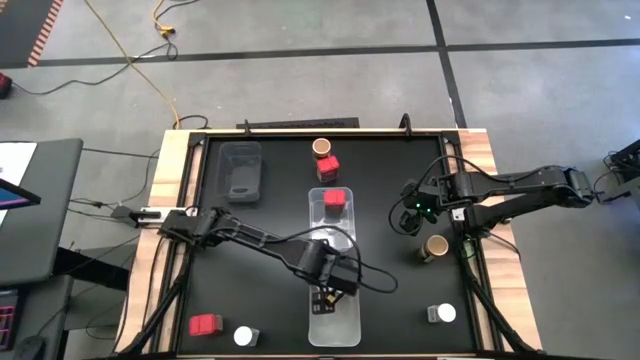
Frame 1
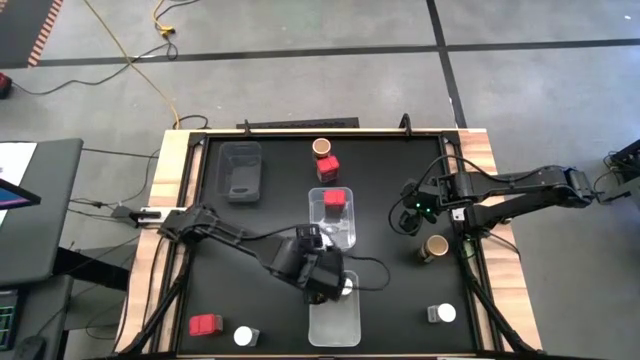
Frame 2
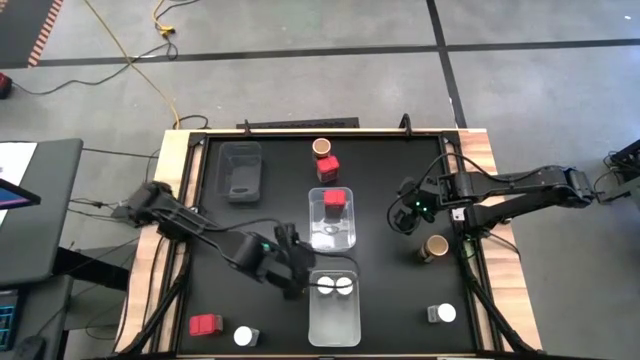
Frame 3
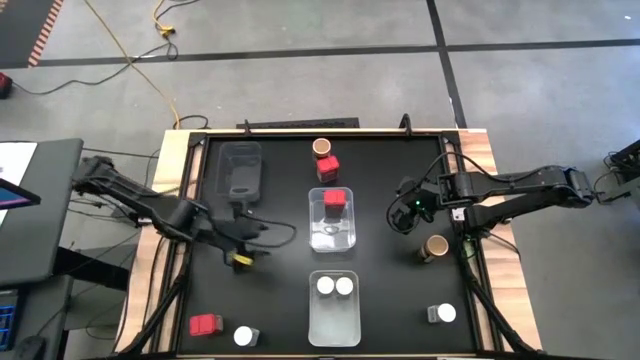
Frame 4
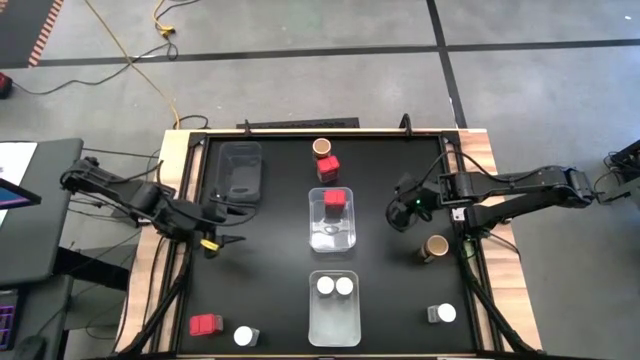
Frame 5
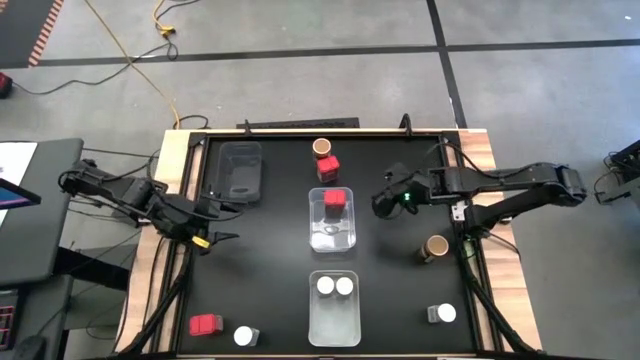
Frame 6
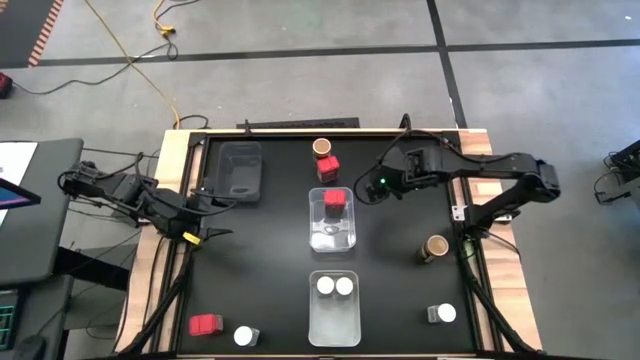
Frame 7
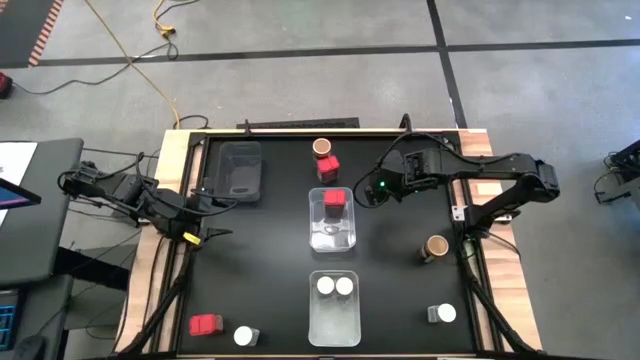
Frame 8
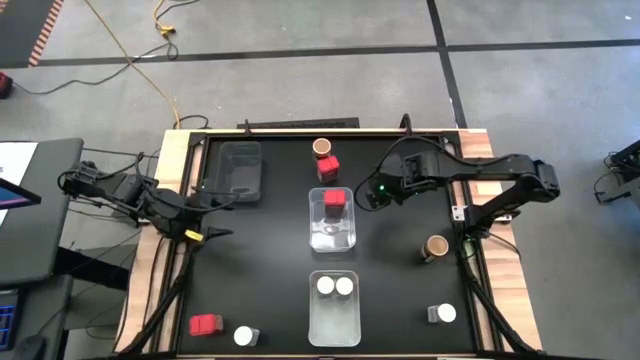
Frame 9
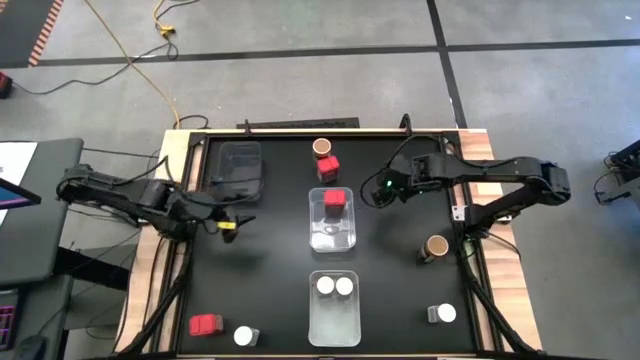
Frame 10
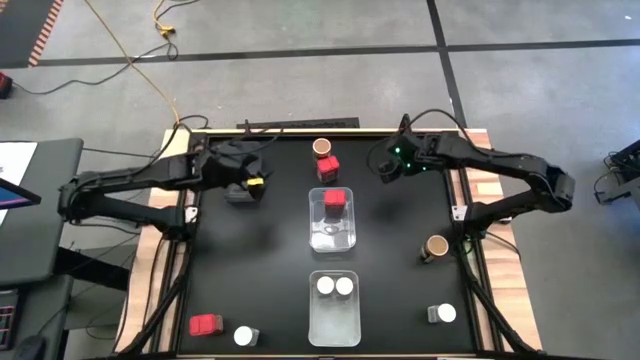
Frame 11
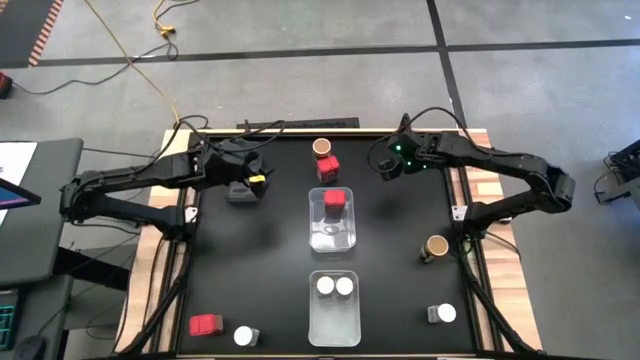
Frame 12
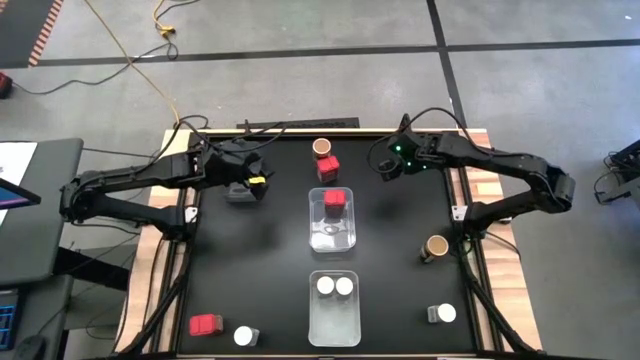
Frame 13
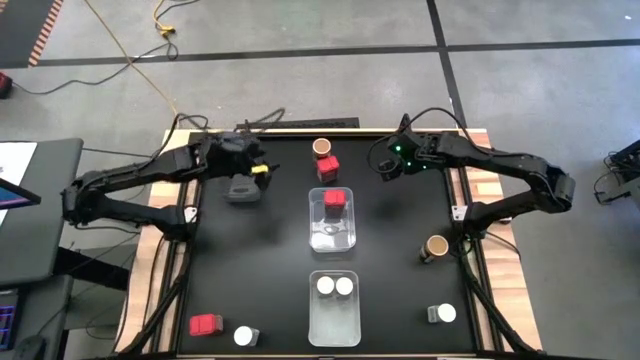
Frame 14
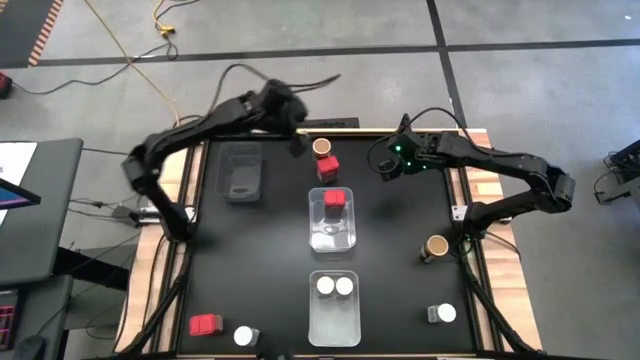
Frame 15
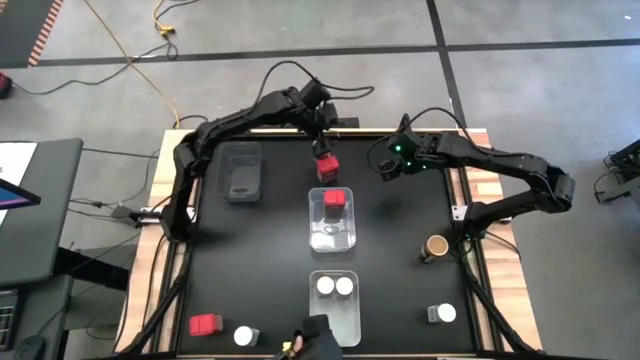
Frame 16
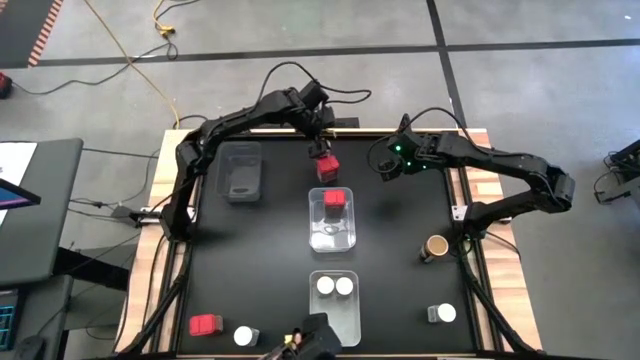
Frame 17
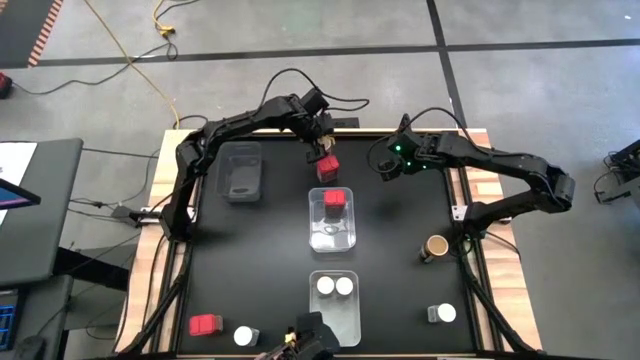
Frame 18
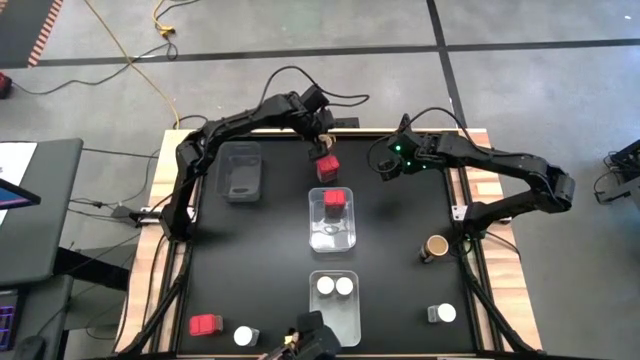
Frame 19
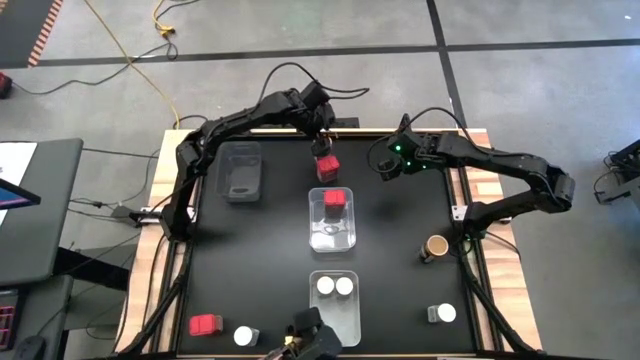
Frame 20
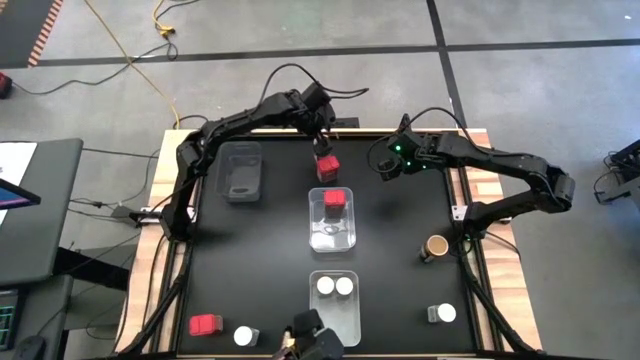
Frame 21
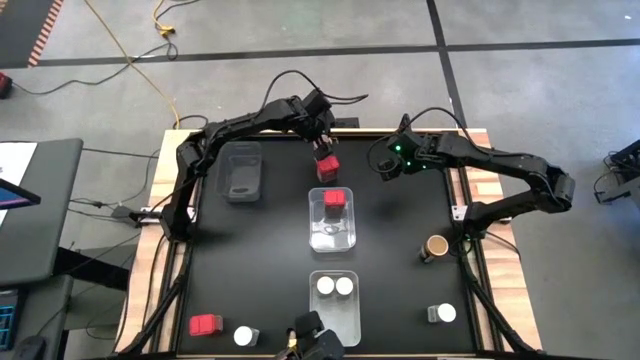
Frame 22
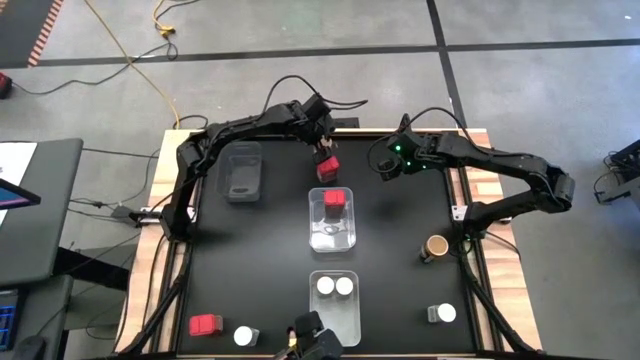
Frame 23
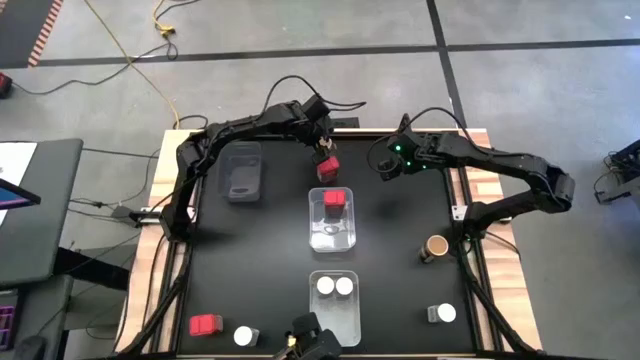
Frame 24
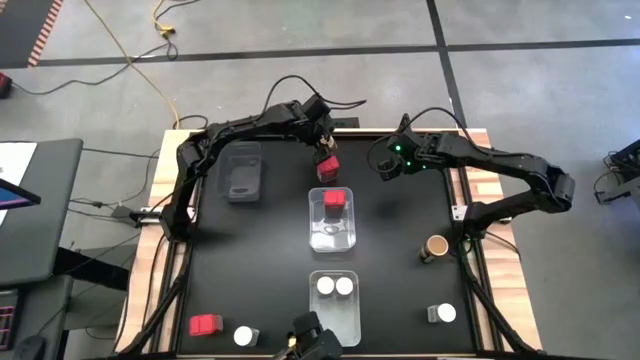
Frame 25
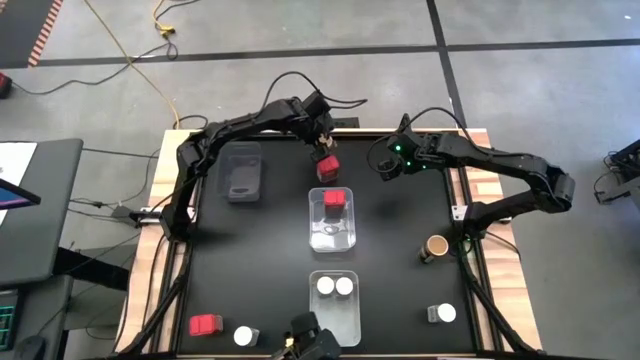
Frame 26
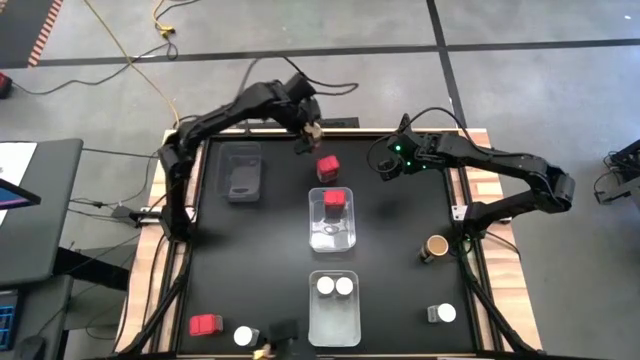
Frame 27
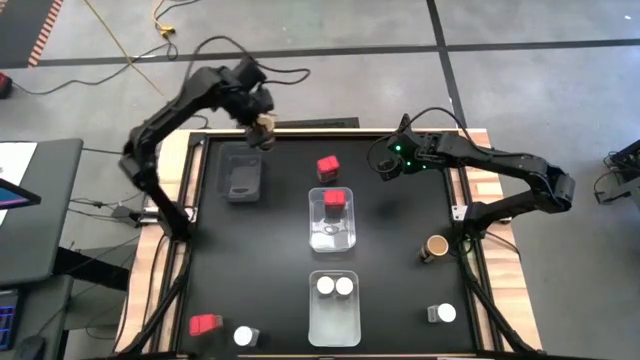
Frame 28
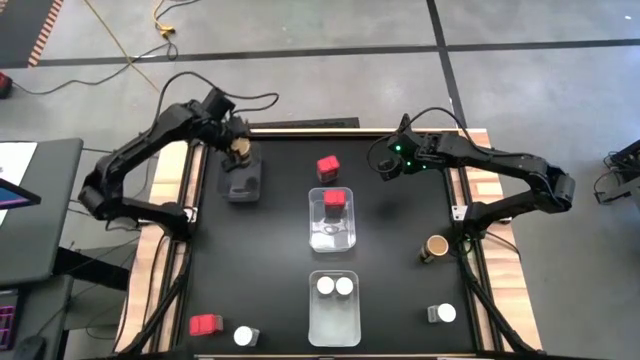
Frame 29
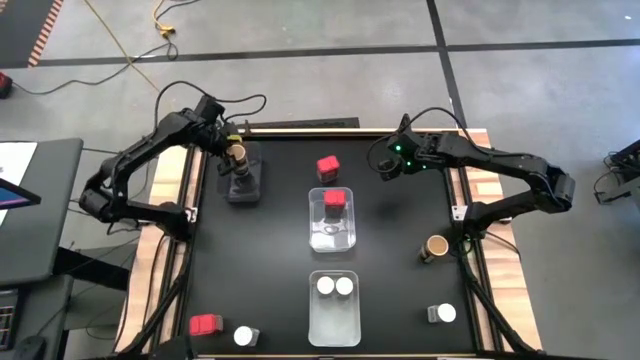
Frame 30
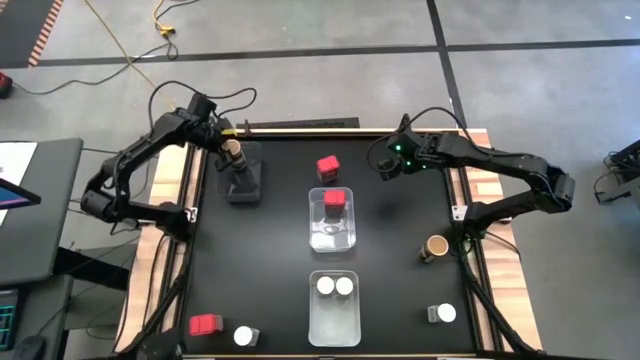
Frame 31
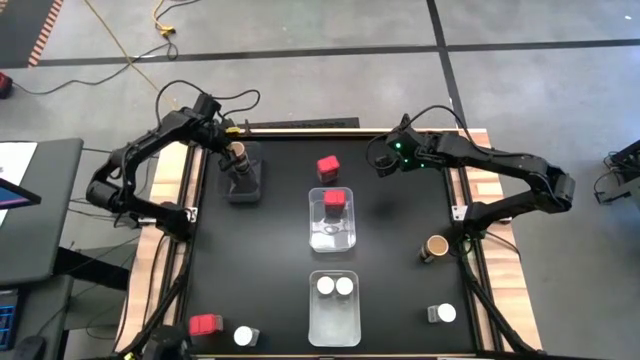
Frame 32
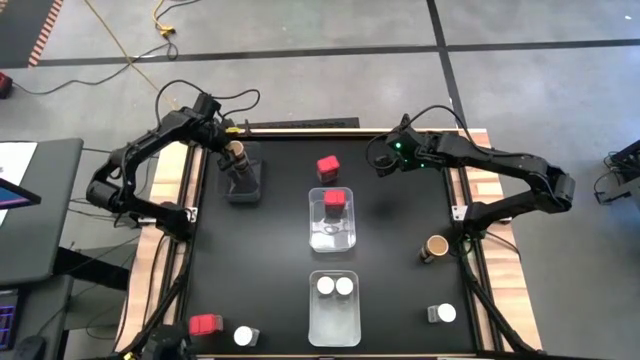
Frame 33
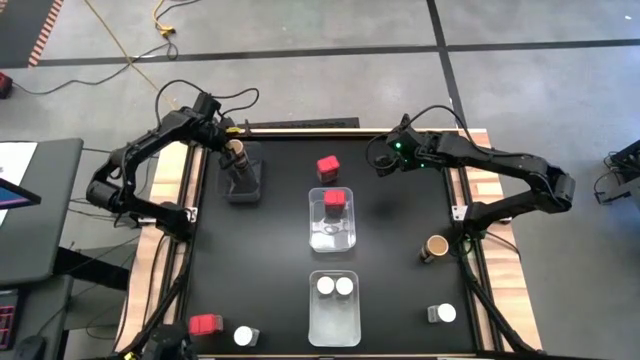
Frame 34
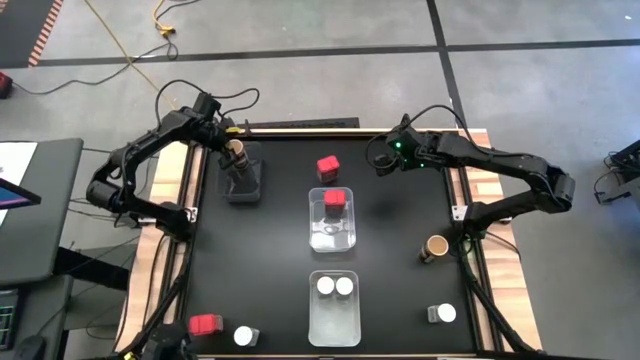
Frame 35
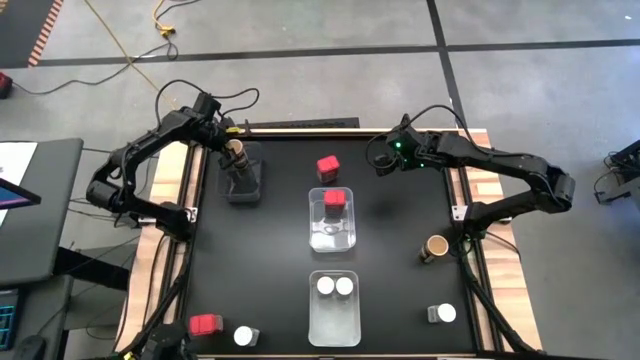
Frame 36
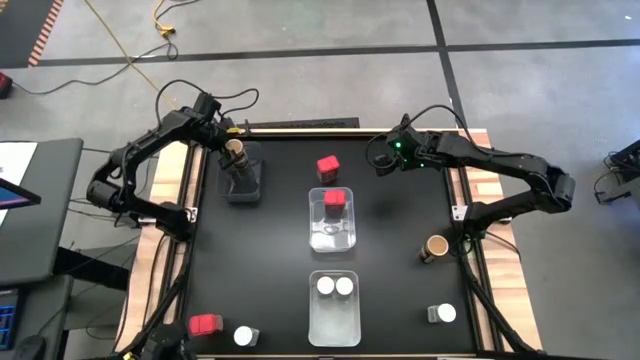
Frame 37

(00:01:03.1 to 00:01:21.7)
Task: Sort spices by type
Put the gold seasoning bottle into the black bin

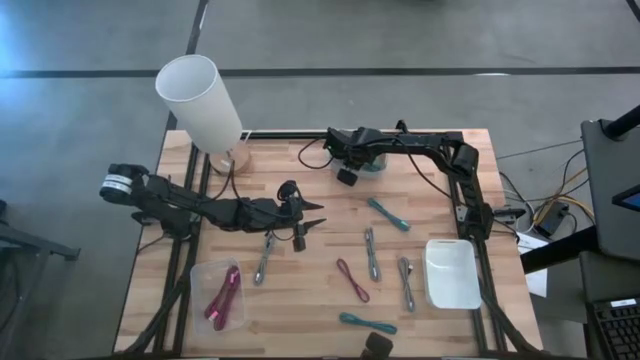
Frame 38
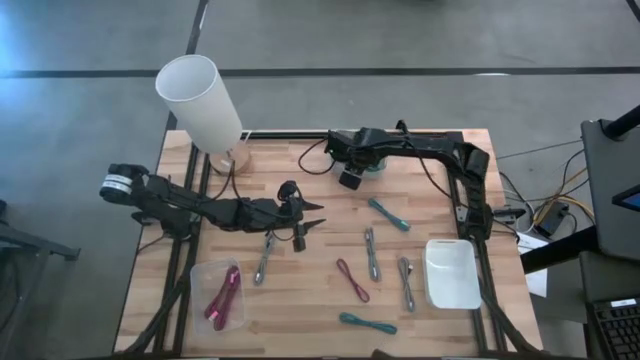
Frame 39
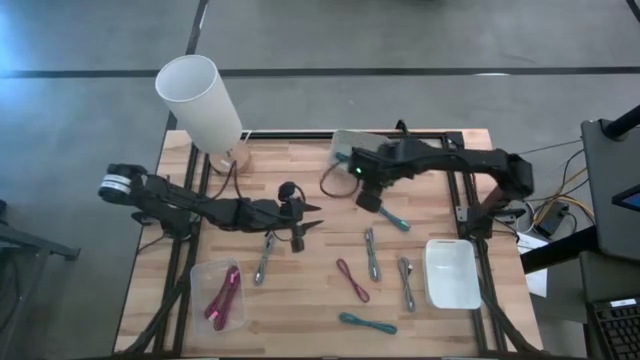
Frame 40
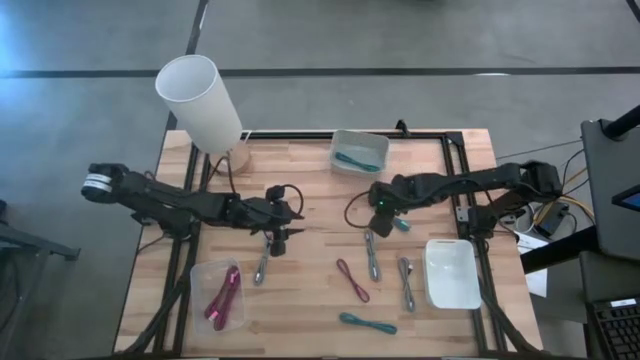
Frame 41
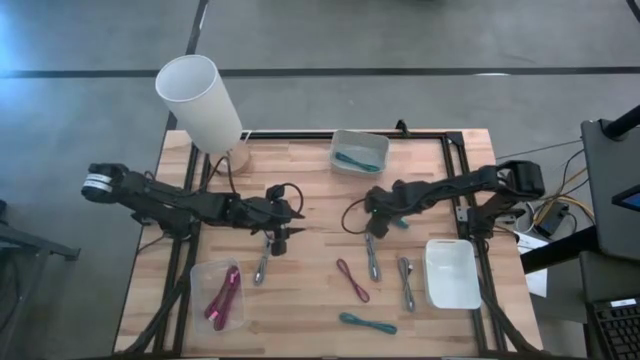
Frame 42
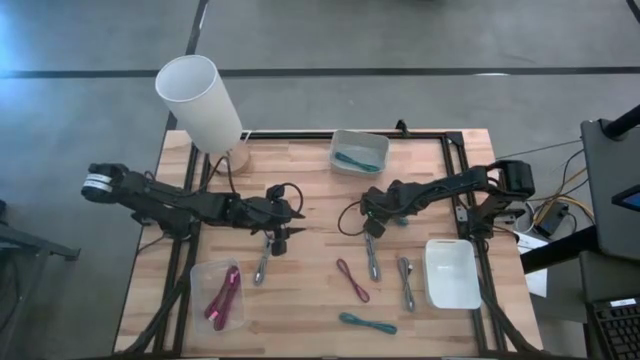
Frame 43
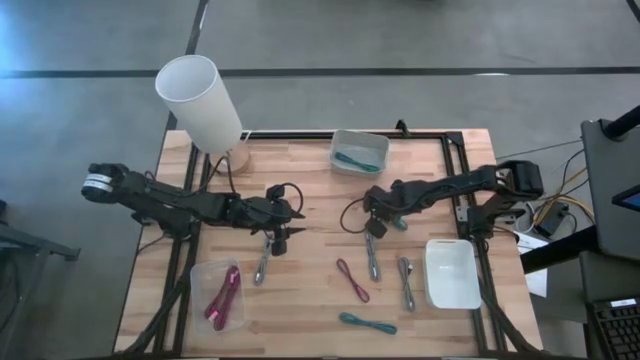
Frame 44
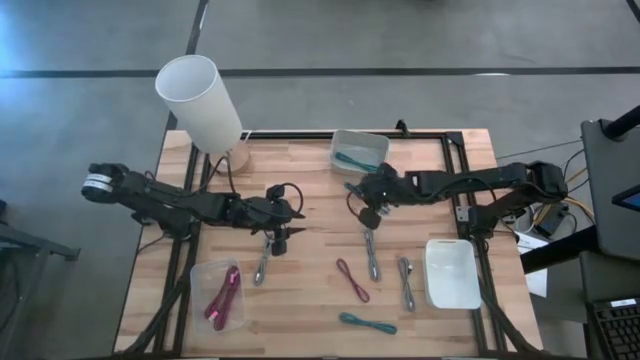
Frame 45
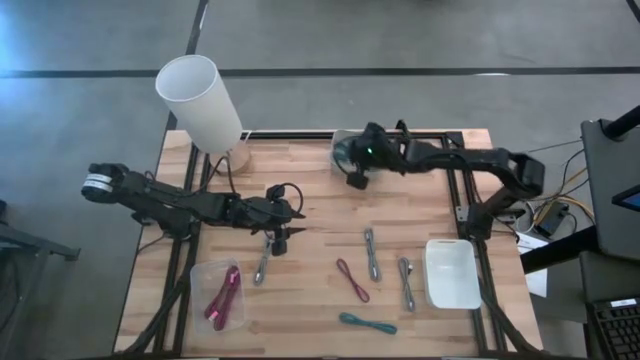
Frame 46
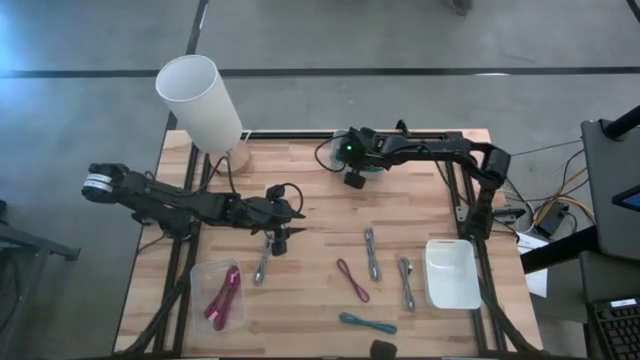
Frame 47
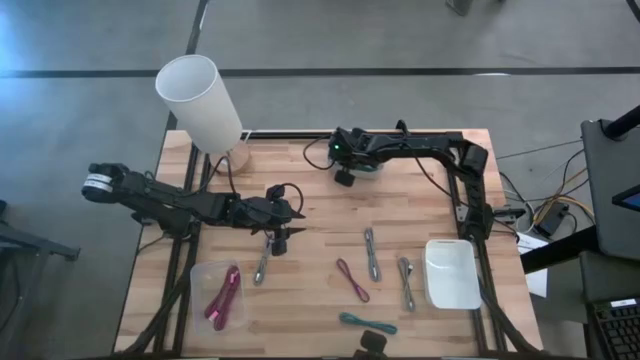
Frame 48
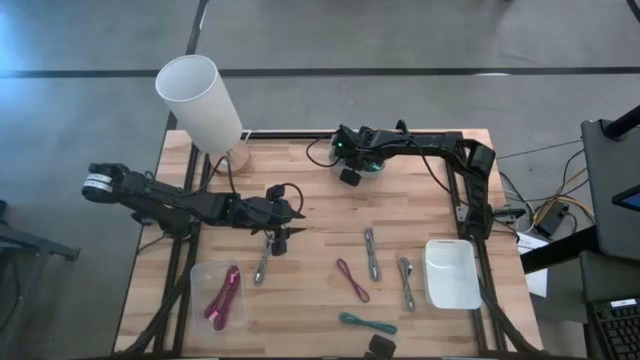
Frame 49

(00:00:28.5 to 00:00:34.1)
Task: Pick & Place USB Port
Put the top blue striped charger cable into the gray bin
